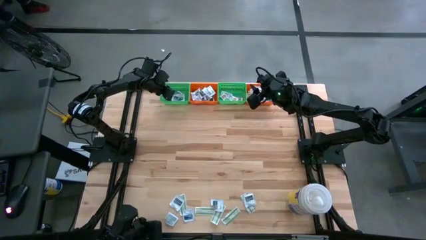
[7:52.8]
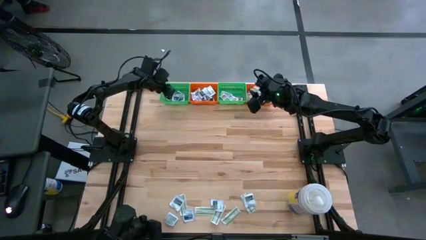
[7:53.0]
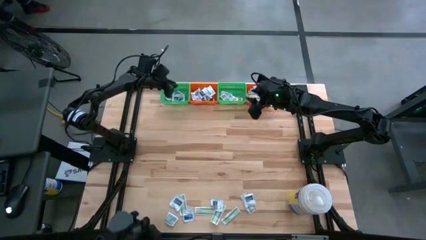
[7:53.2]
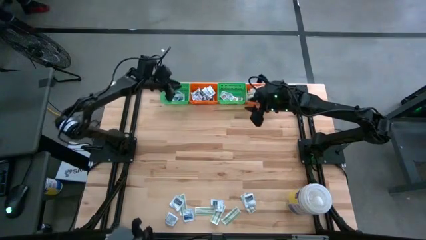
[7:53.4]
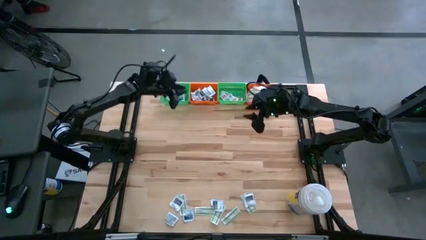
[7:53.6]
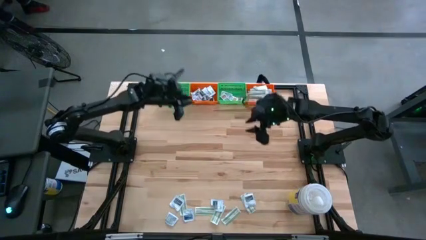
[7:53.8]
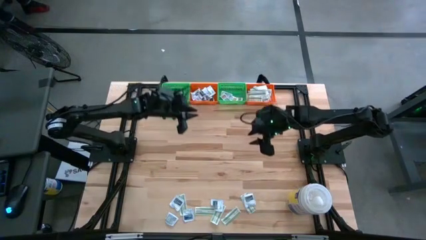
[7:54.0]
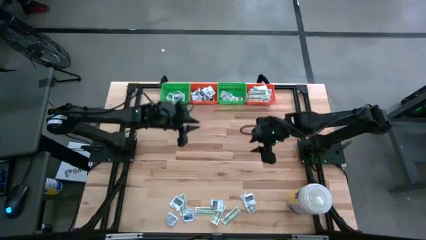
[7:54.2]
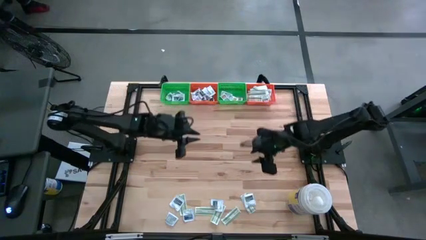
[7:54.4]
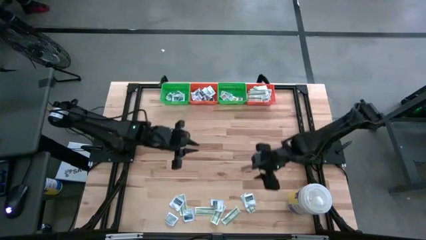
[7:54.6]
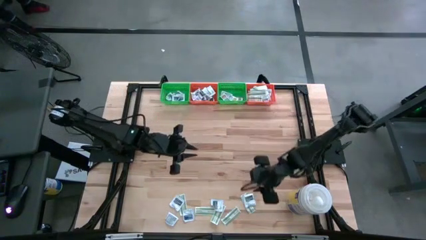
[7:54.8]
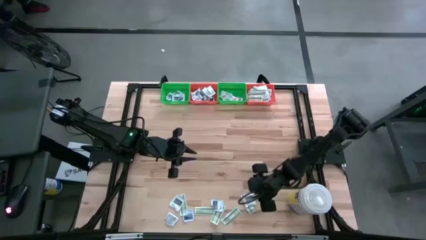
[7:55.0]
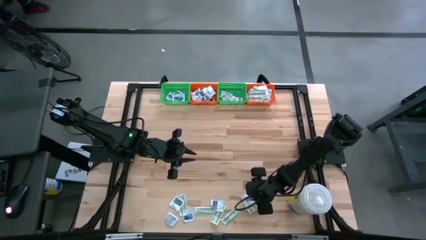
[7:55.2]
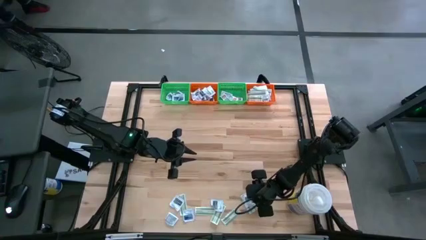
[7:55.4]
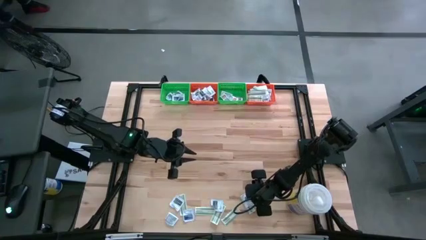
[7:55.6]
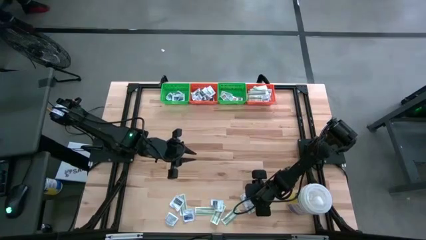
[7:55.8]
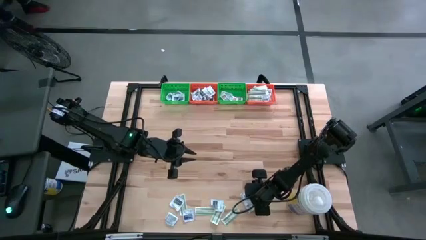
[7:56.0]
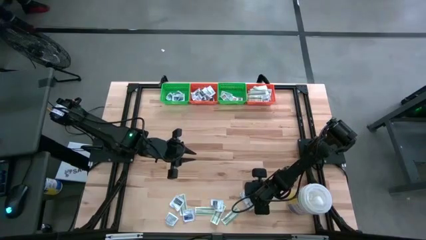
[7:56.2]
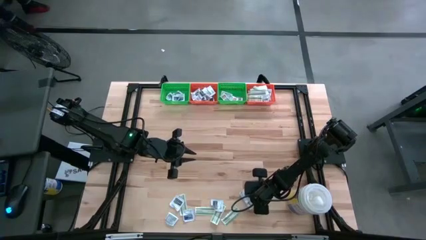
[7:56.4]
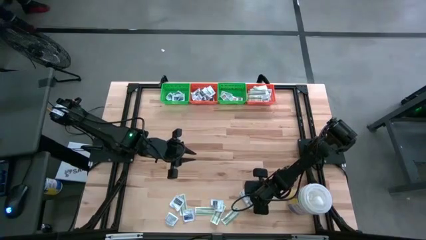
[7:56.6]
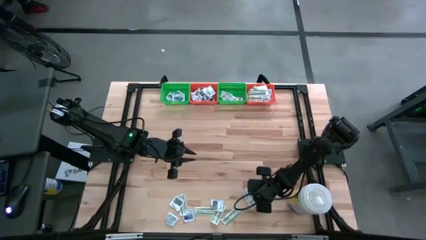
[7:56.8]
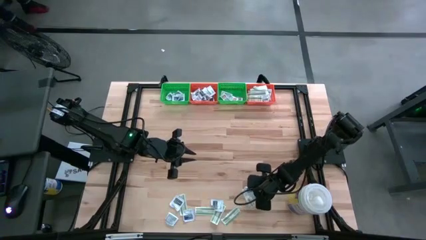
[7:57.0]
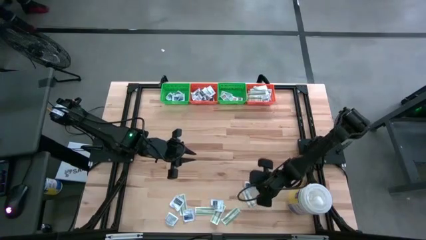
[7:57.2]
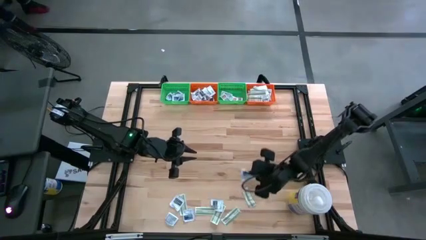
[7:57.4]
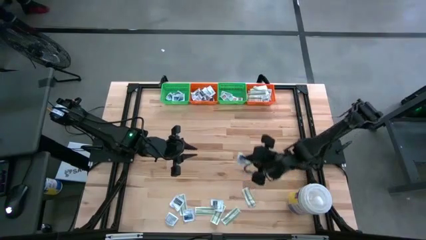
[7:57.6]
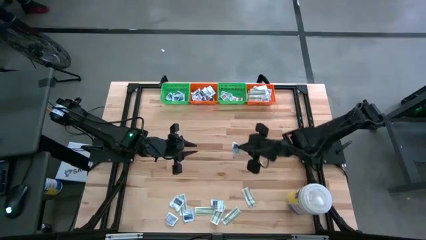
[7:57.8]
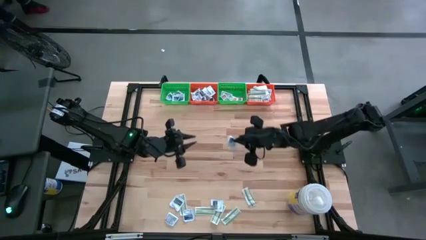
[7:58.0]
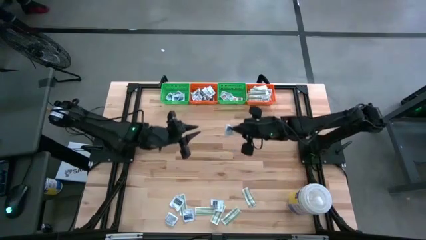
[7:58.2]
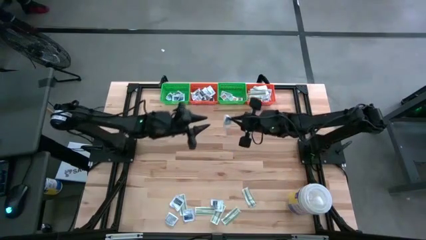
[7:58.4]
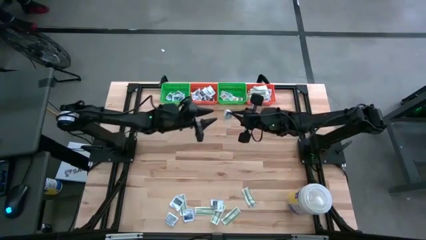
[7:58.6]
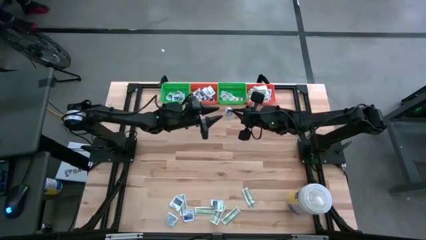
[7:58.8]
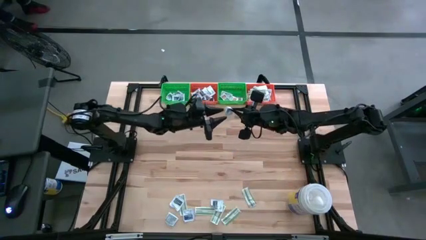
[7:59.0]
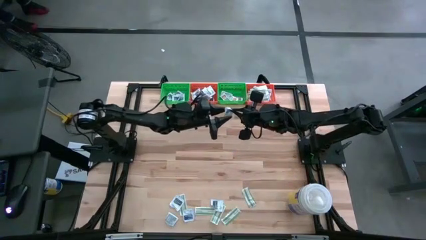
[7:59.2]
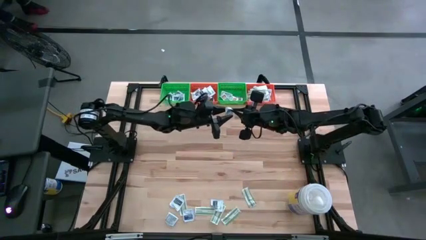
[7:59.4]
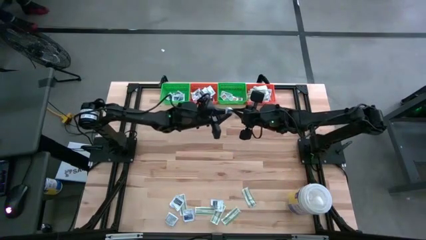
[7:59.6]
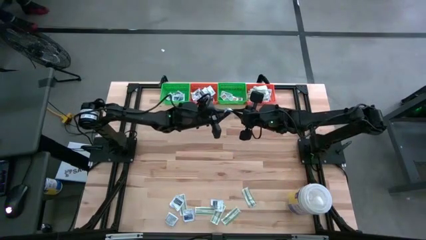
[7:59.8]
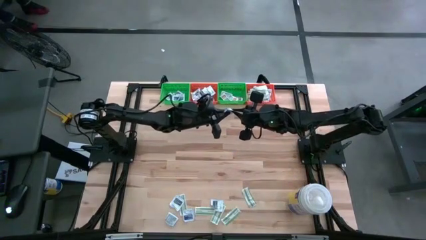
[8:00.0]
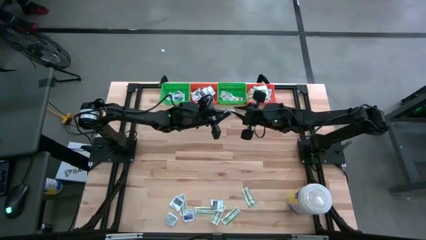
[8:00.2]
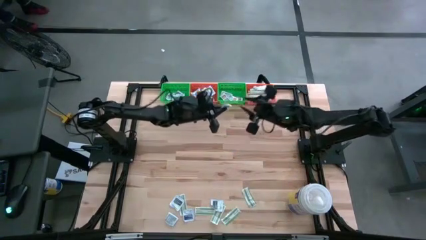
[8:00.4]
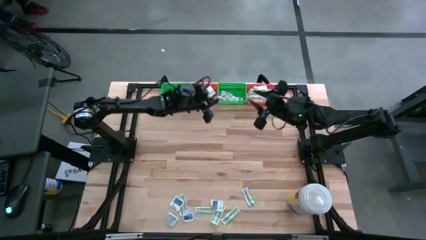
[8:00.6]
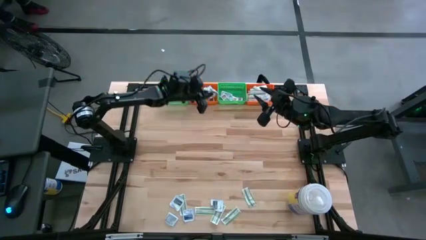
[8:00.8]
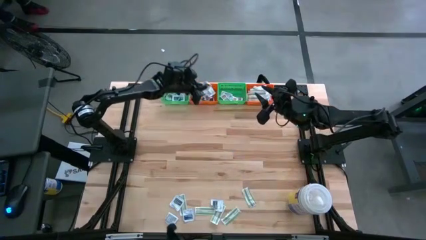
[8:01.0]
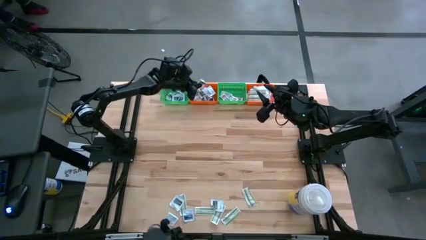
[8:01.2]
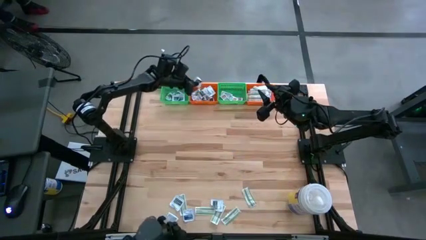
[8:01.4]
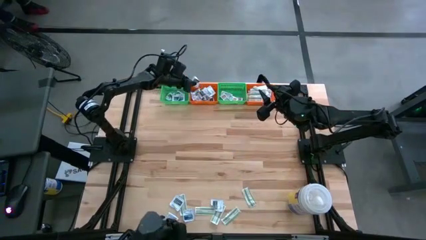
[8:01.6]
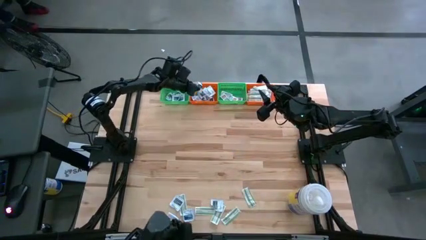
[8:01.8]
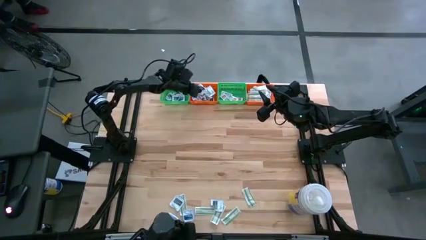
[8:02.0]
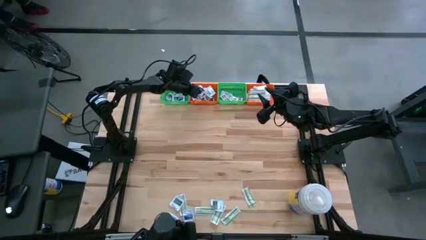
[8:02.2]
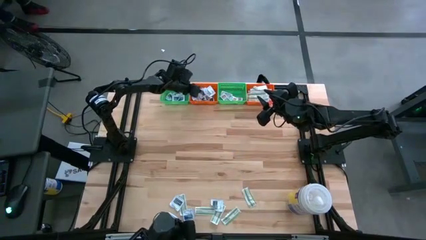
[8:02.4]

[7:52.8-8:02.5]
Task: Pick & Place First Aid Supplies
Put the gray towelette pack in the left orange bin

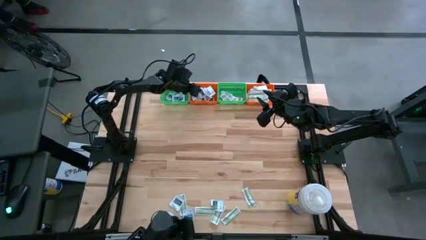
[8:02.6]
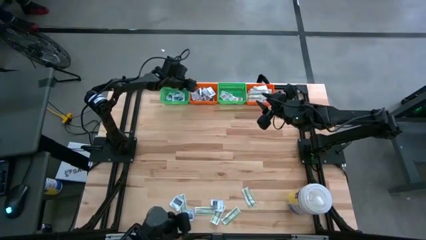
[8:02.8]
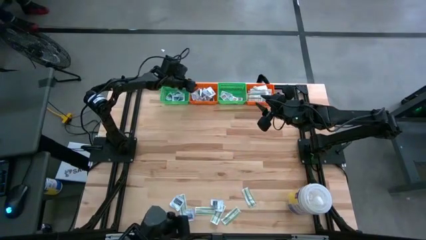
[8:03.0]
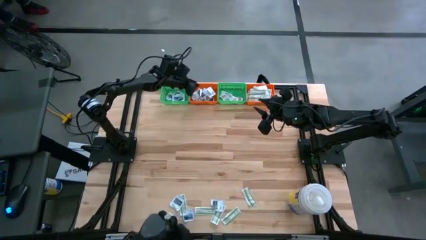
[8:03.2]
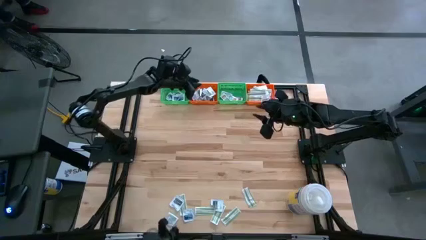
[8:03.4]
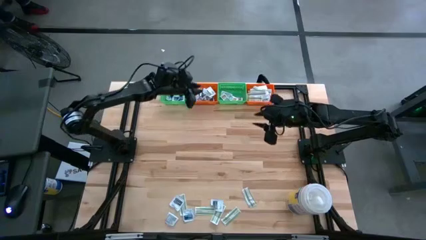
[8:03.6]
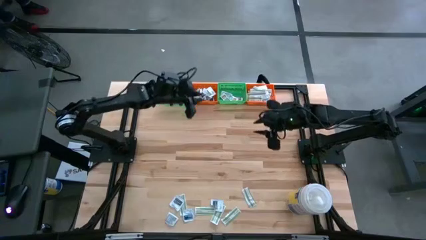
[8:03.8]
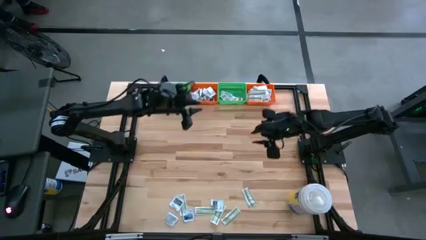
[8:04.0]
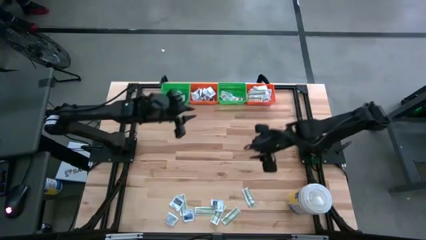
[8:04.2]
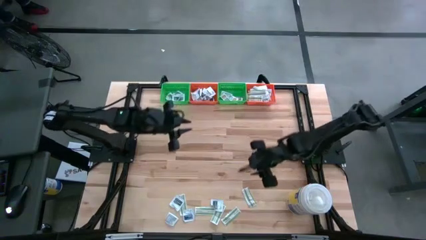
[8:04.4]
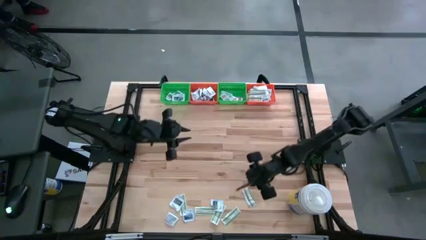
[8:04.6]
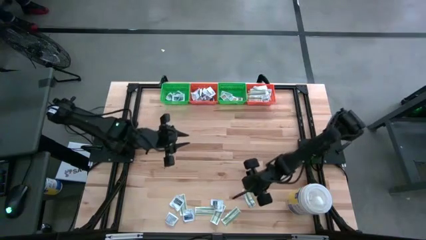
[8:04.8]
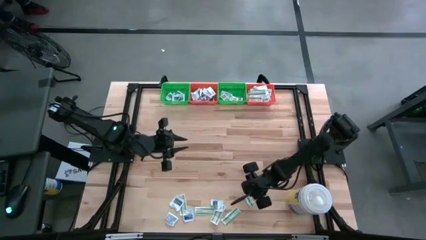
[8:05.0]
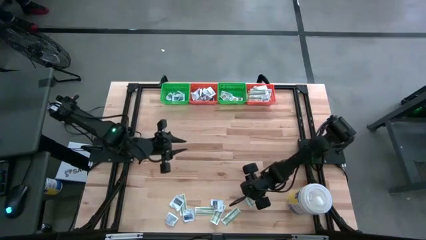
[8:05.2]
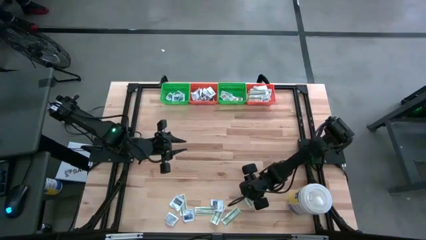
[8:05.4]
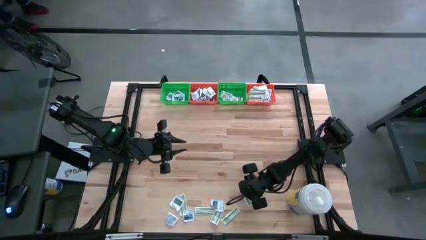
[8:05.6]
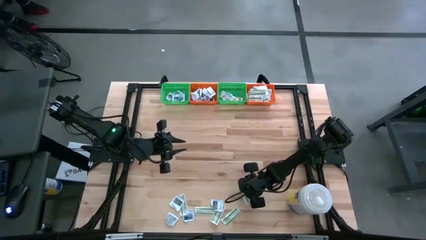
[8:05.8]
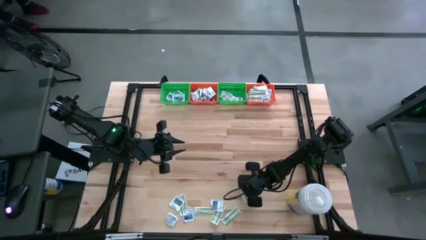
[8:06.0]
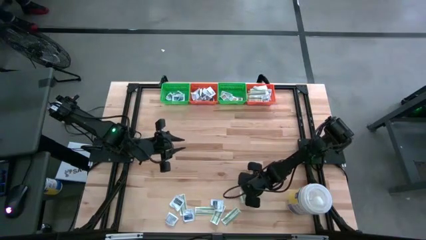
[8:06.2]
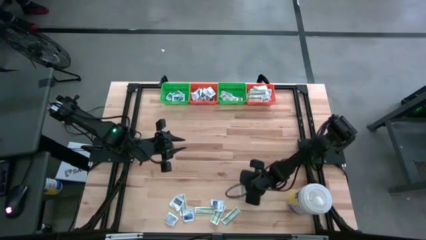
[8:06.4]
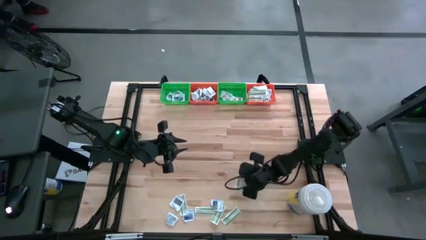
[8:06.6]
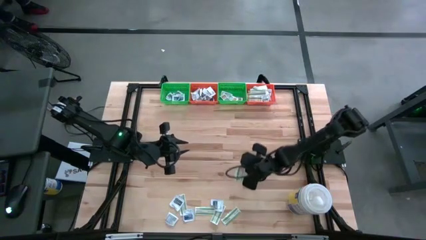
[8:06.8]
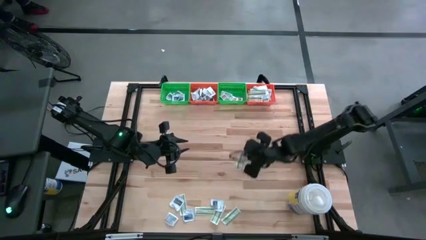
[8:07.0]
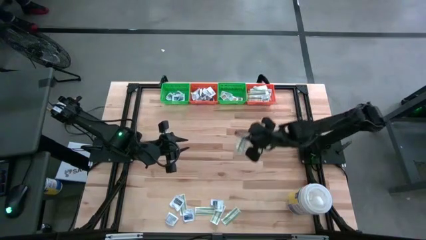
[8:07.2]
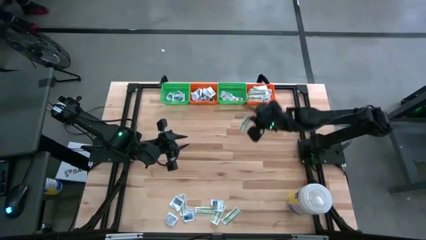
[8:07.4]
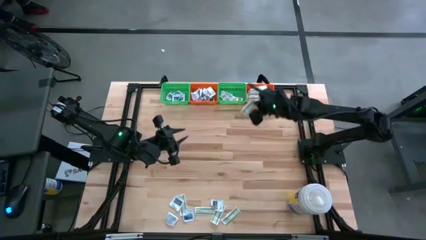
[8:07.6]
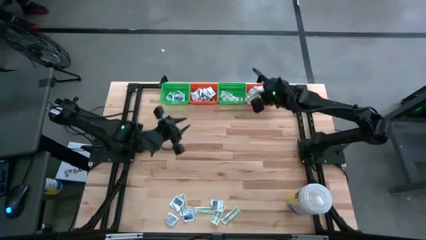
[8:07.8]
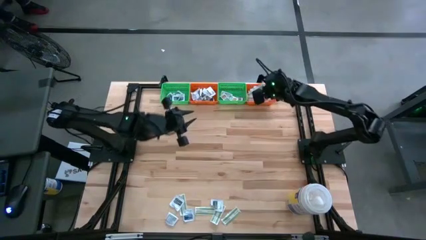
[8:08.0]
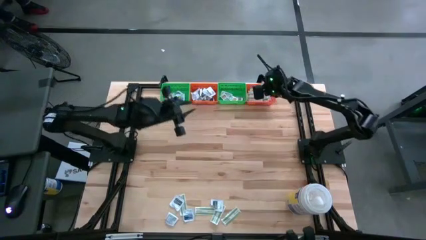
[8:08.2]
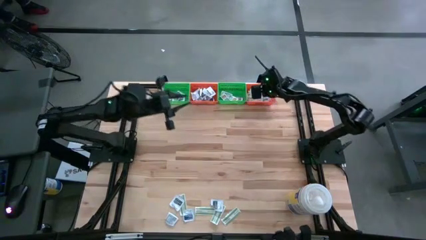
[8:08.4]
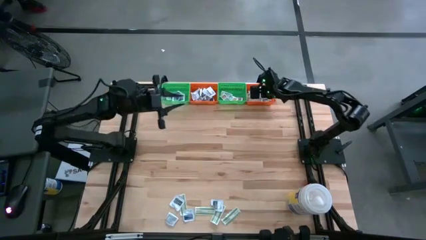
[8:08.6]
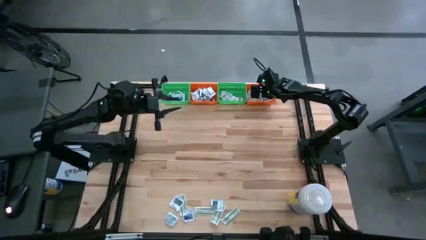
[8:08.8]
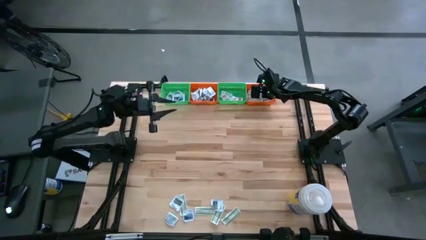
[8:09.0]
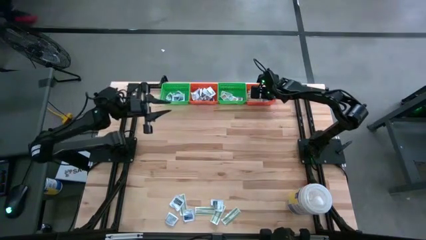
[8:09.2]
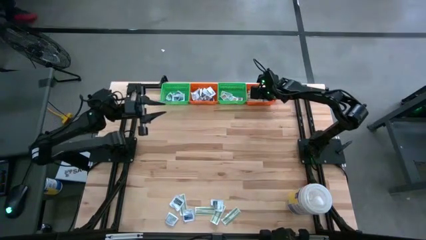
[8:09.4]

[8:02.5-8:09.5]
Put the green bandage pack in the right orange bin
